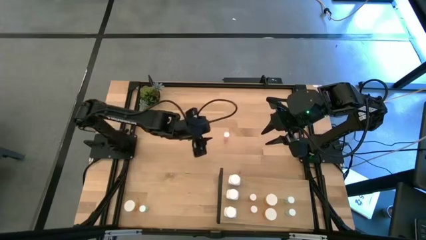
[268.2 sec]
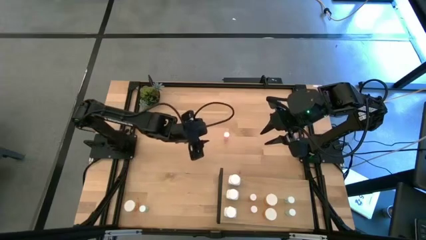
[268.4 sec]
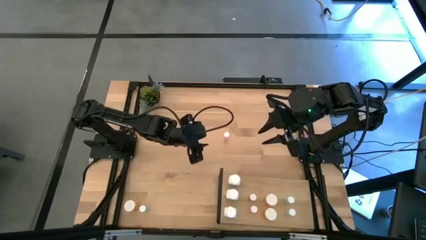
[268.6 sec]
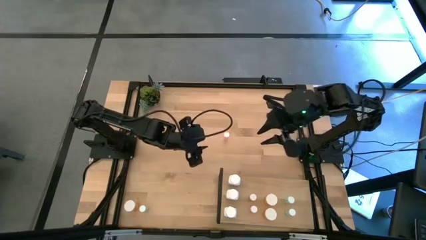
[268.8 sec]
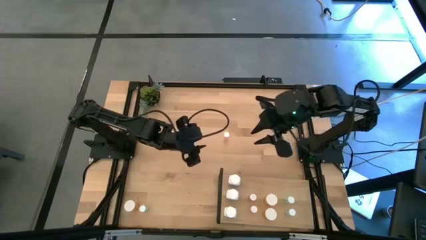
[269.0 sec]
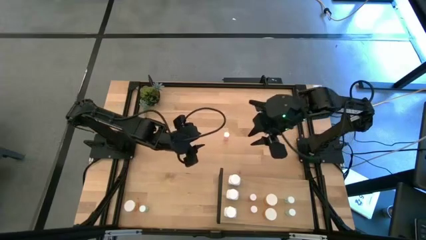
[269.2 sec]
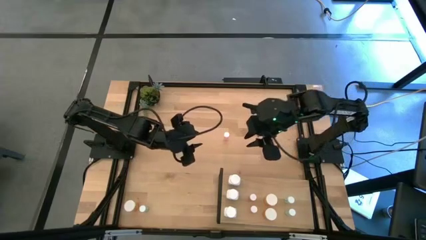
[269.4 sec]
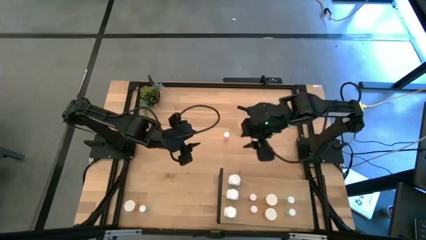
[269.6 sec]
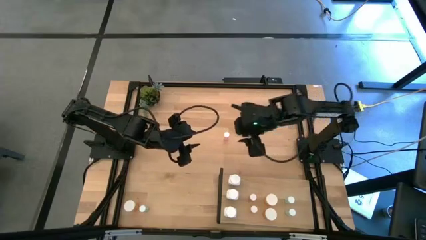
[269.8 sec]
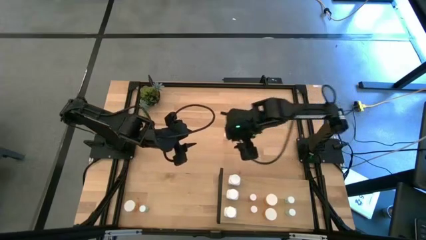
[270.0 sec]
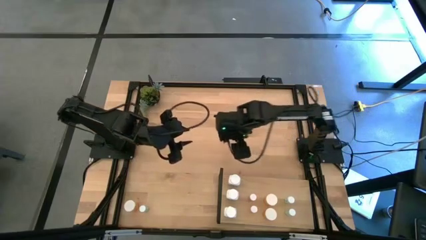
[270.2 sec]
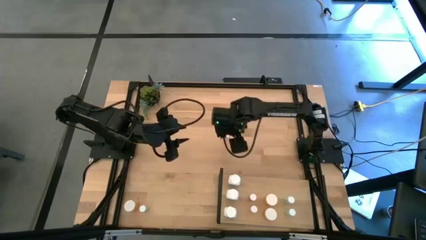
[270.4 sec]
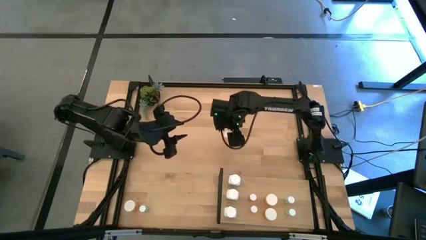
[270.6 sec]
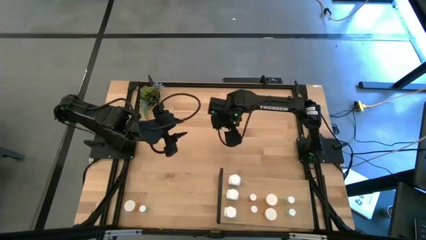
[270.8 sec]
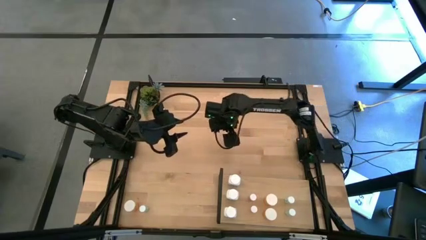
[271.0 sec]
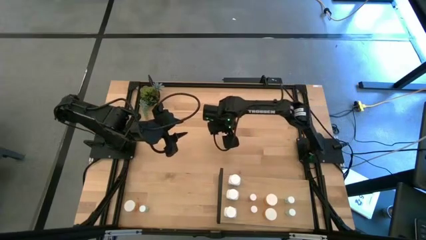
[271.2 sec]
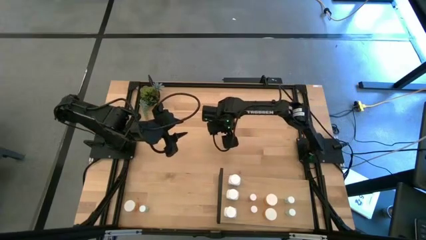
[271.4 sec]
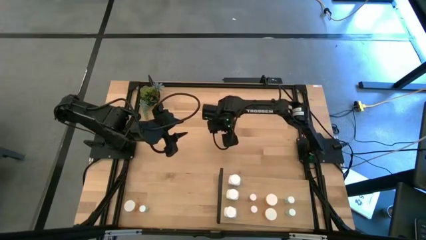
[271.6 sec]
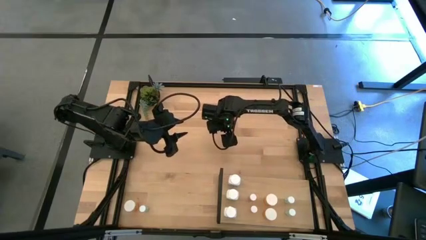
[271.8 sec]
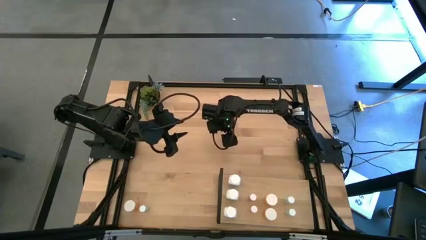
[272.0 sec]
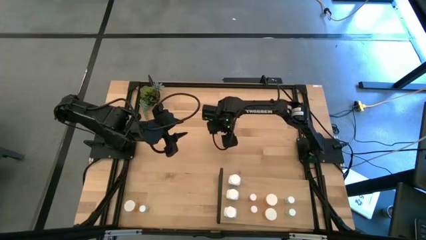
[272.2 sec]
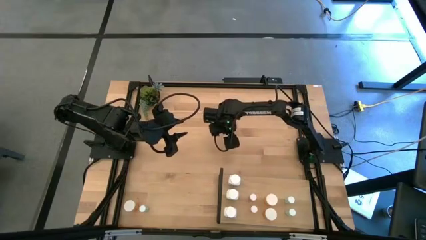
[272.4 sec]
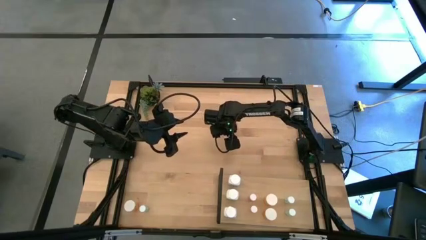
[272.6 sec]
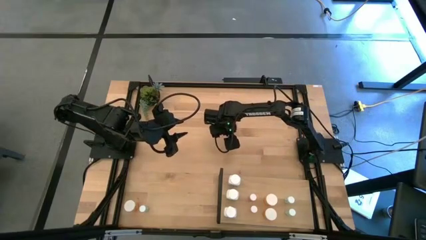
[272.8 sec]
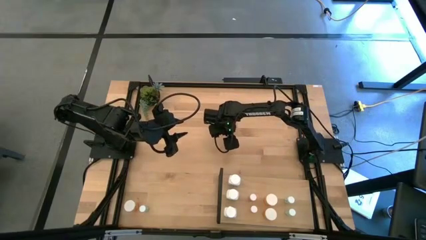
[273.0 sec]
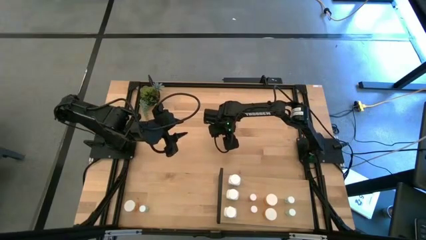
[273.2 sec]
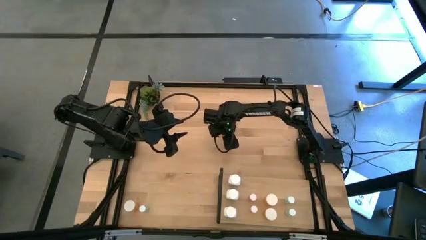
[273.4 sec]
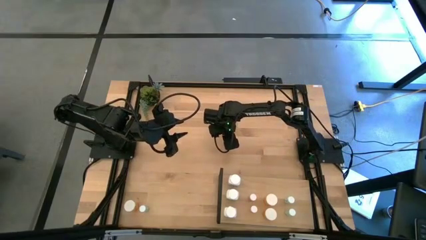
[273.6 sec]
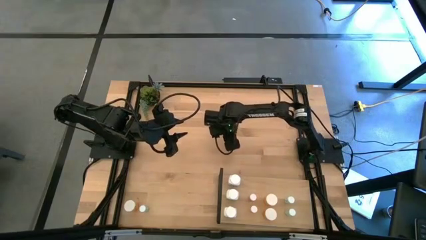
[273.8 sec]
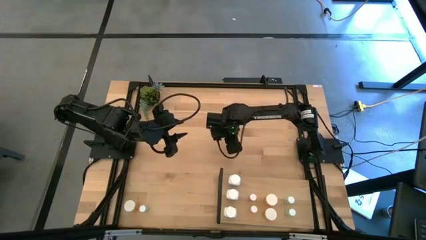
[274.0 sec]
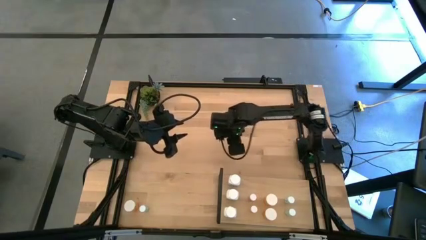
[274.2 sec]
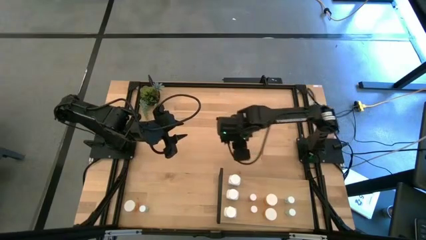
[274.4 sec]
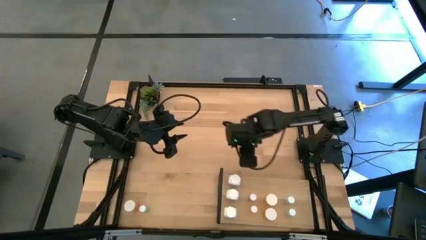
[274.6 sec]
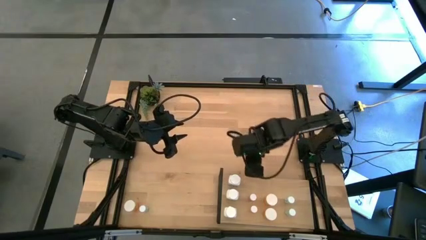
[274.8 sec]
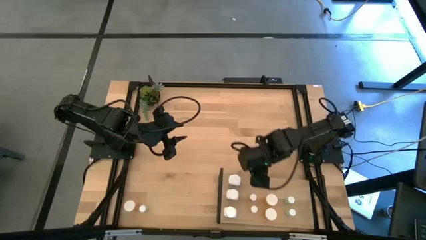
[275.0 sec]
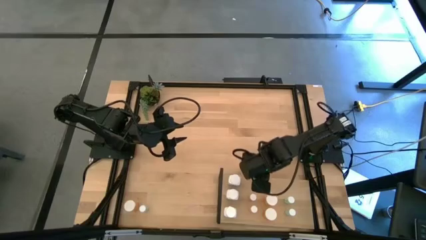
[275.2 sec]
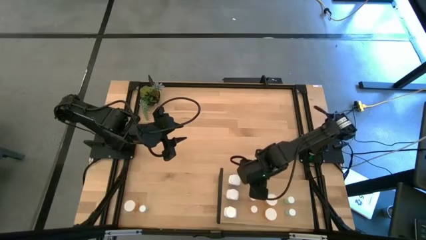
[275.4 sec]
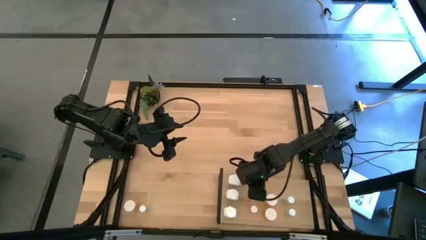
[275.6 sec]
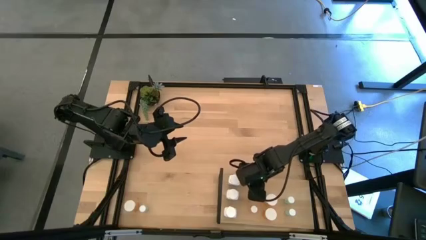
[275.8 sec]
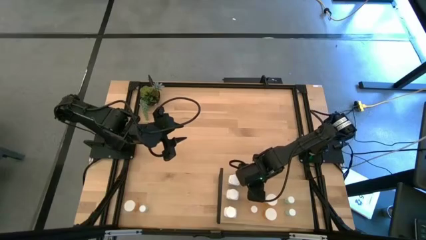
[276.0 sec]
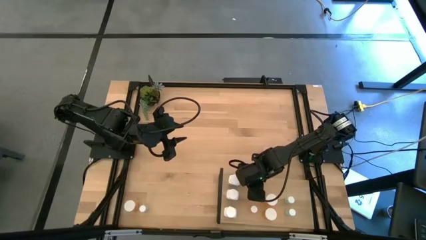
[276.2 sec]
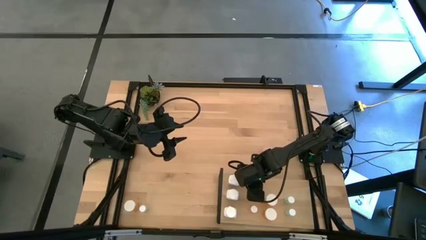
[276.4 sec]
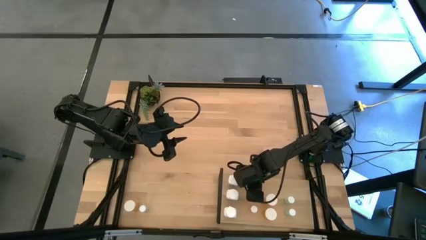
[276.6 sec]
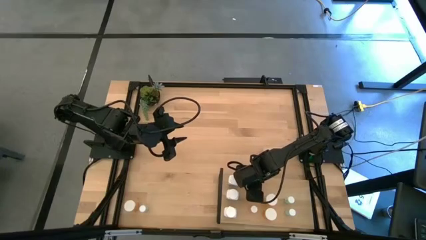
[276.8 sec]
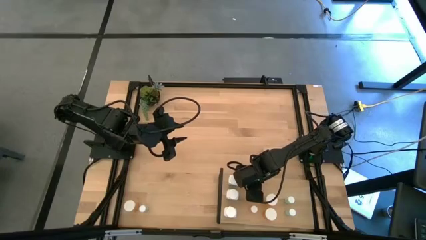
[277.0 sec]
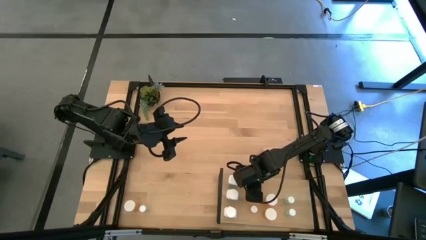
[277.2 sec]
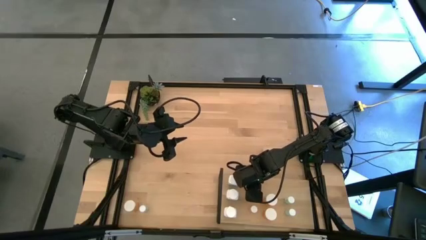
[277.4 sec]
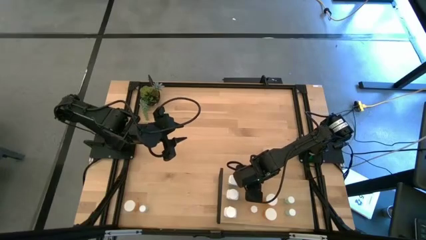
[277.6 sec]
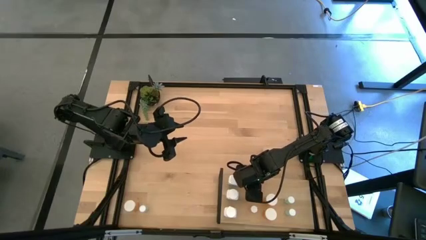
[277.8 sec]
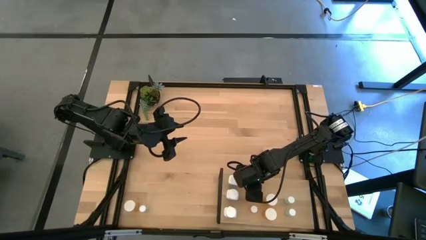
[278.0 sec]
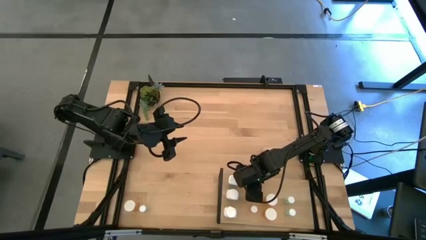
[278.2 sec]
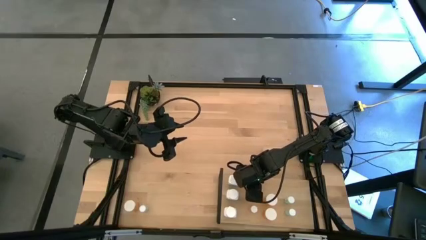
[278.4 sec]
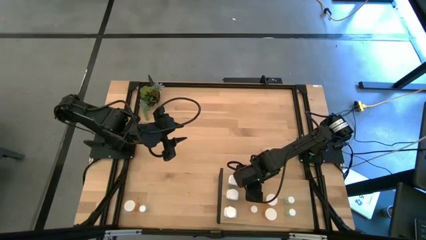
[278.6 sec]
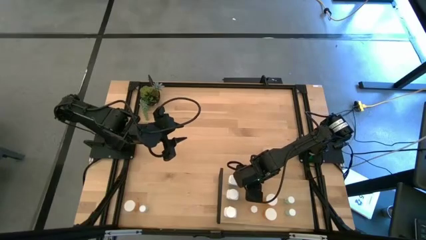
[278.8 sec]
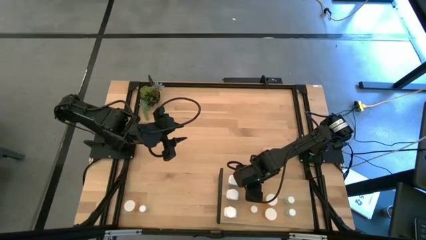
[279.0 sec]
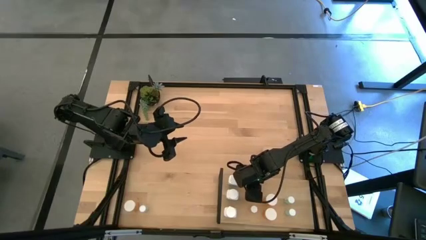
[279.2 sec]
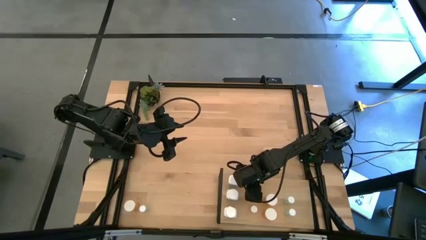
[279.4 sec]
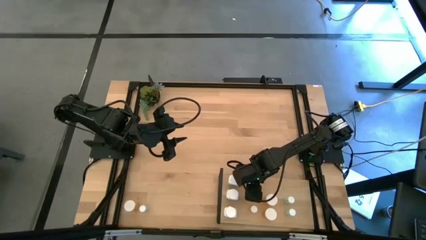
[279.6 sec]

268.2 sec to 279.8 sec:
Task: Pick and place medicine bottles onto shelf by color
Put the top pink pill bottle on the shelf

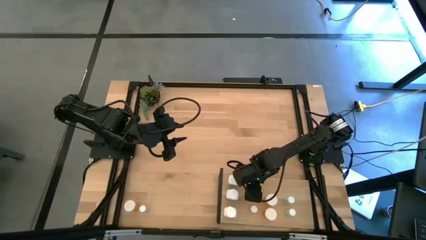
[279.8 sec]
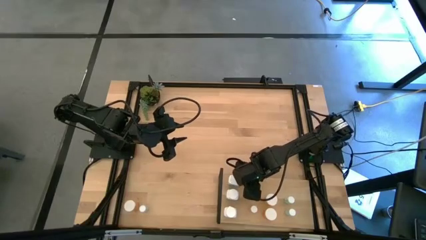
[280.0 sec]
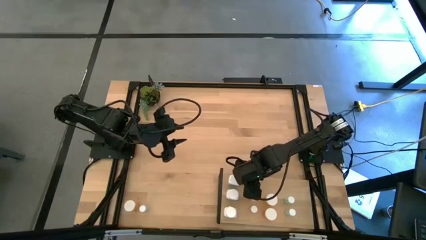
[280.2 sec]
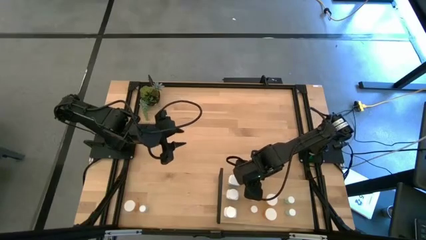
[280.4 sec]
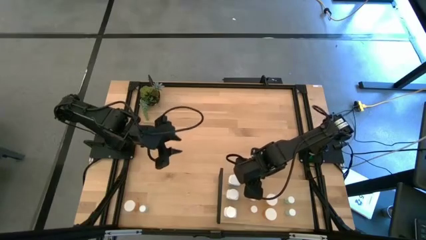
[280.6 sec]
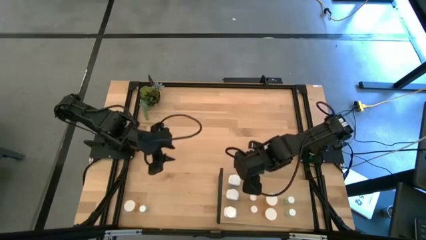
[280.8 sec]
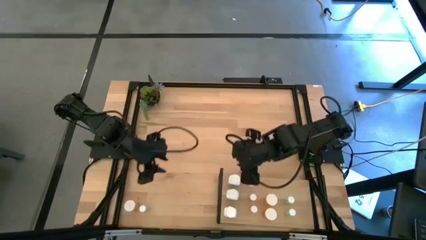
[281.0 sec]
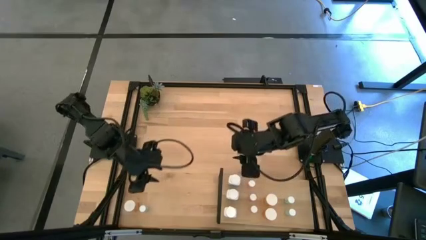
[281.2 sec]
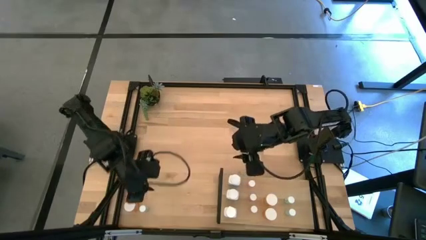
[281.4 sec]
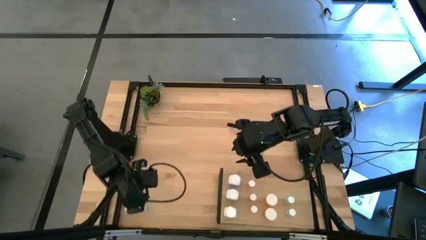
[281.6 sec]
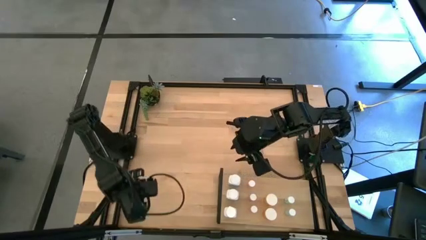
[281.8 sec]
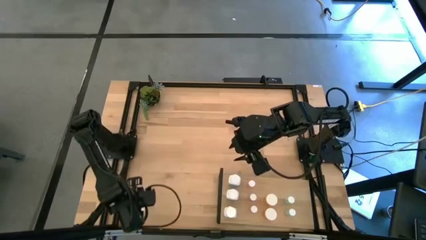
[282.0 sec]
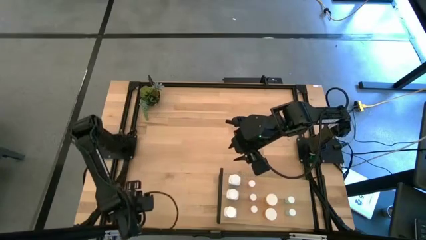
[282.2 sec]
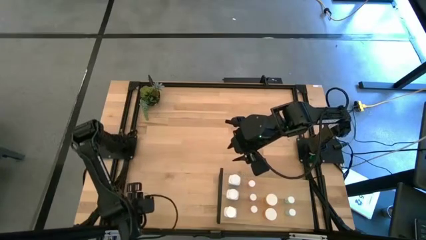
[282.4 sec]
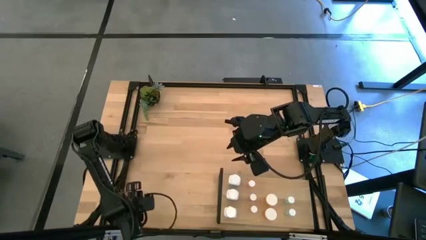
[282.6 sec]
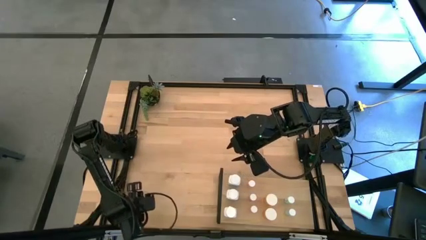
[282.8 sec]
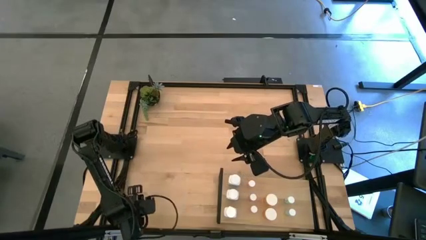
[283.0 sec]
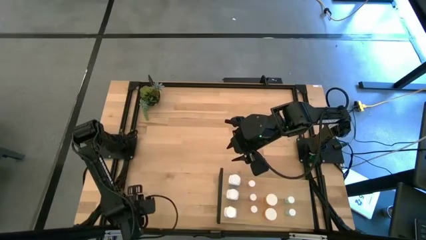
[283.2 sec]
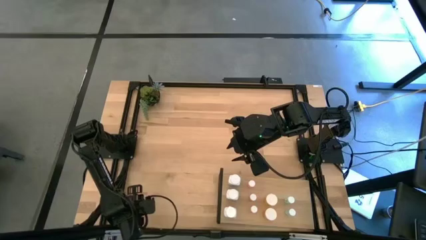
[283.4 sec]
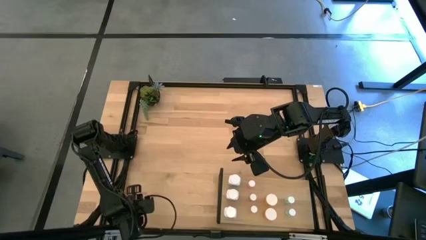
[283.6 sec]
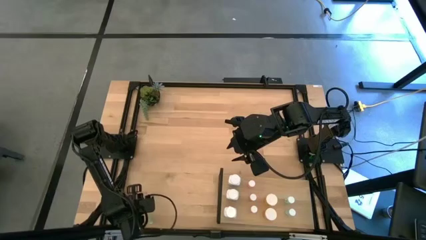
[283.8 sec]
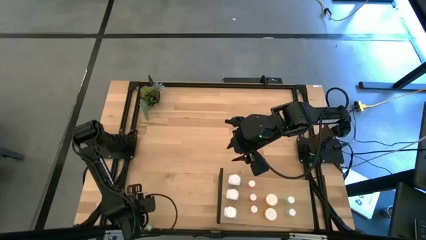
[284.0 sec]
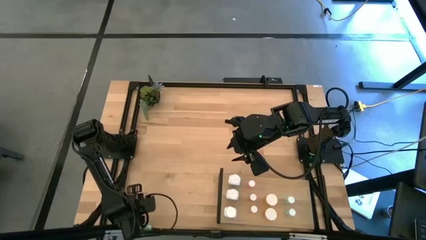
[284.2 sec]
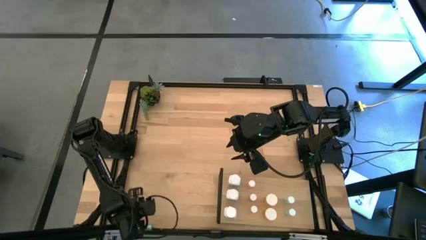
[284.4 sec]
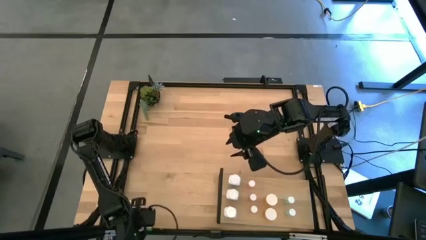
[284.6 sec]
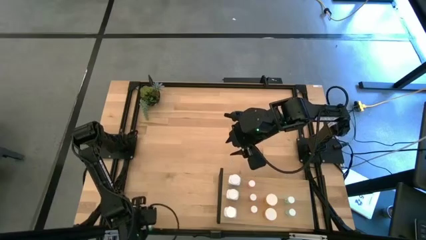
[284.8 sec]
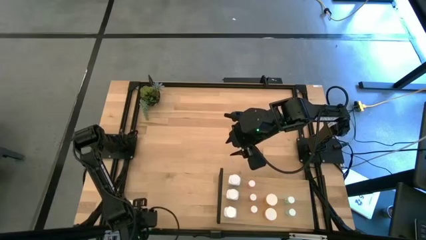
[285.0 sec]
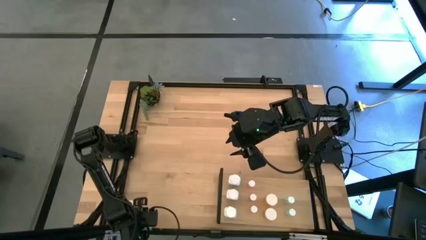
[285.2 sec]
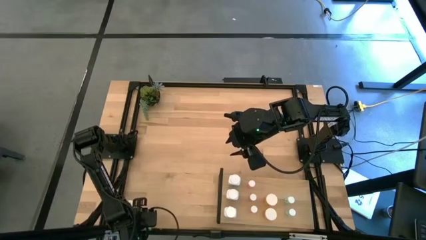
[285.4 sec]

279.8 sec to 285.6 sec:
Put the bottom left blue pill bottle on the shelf
